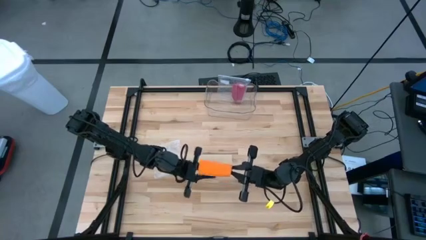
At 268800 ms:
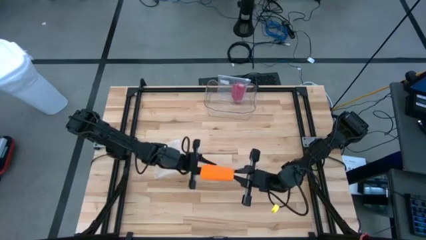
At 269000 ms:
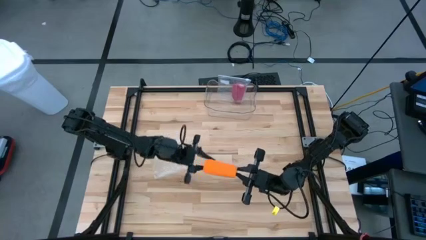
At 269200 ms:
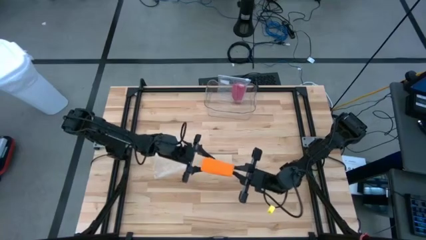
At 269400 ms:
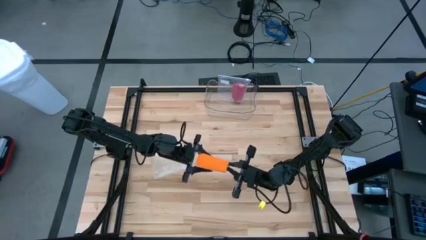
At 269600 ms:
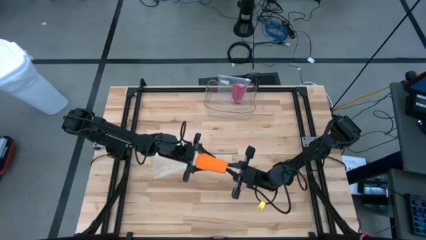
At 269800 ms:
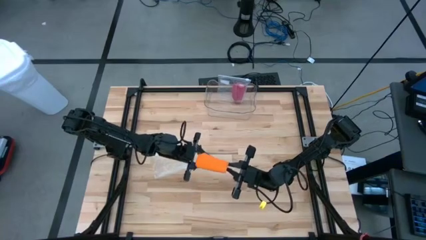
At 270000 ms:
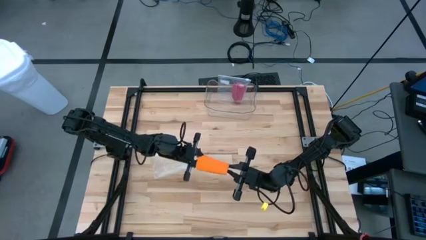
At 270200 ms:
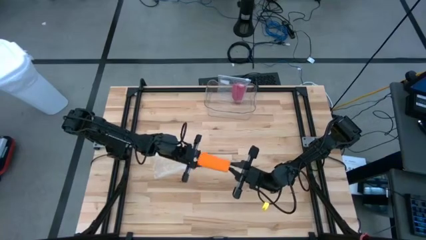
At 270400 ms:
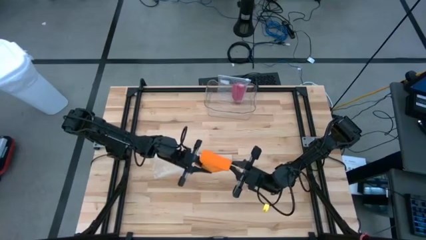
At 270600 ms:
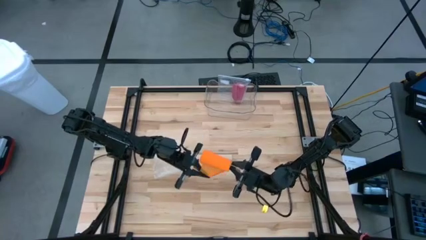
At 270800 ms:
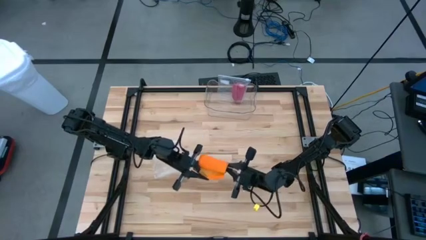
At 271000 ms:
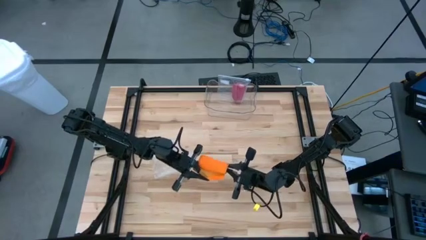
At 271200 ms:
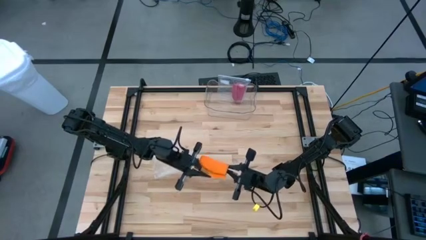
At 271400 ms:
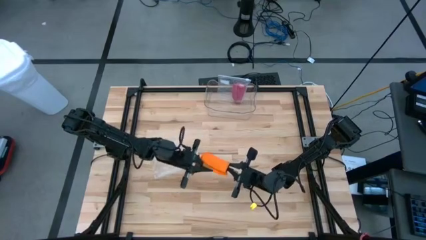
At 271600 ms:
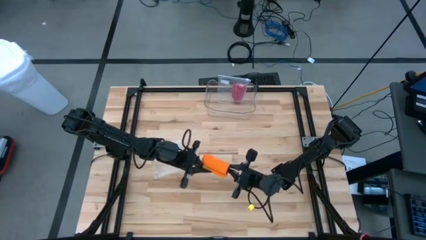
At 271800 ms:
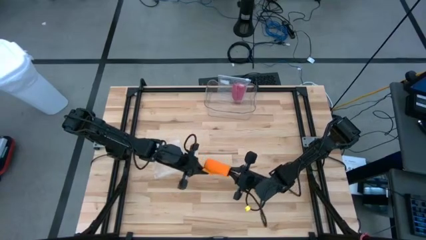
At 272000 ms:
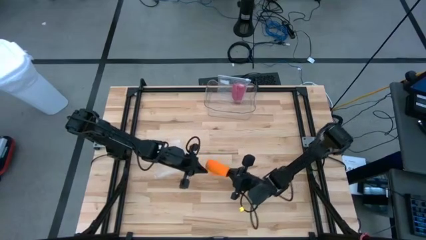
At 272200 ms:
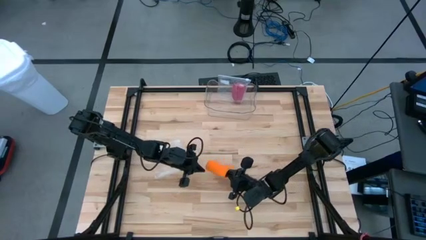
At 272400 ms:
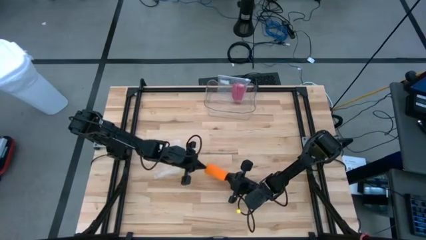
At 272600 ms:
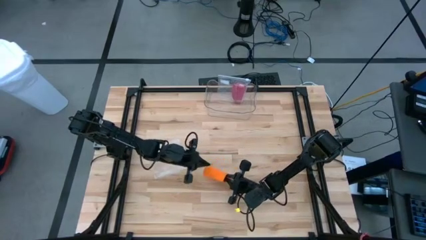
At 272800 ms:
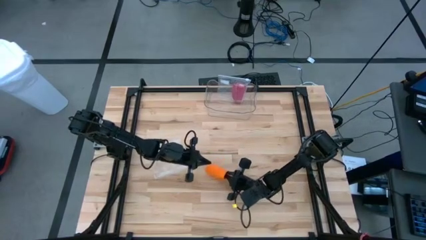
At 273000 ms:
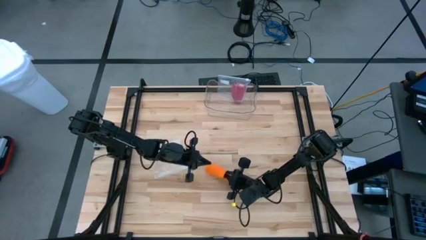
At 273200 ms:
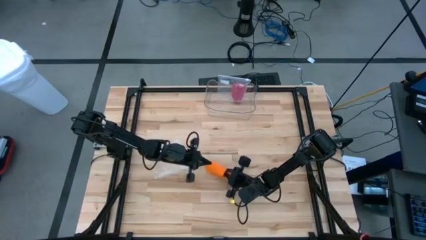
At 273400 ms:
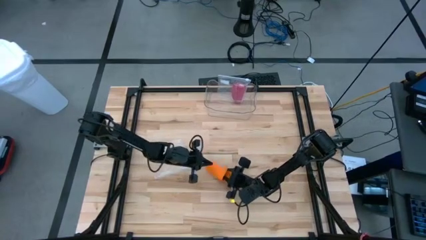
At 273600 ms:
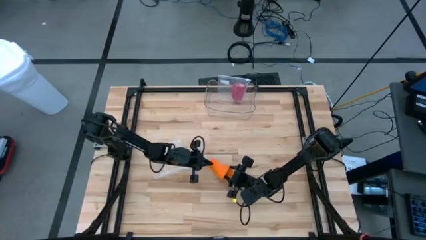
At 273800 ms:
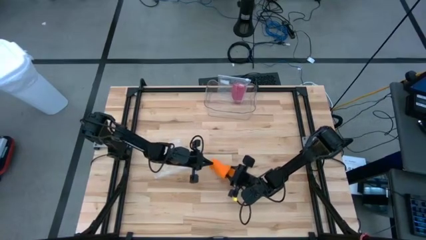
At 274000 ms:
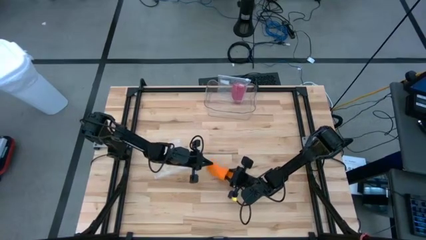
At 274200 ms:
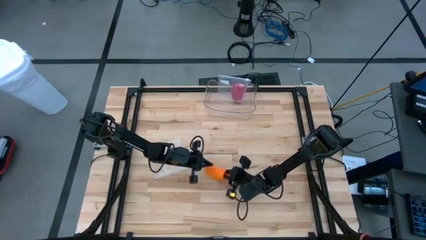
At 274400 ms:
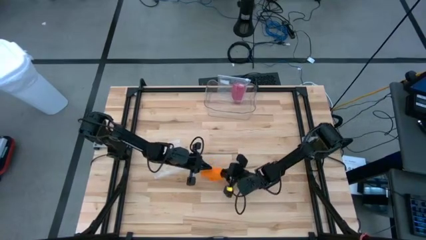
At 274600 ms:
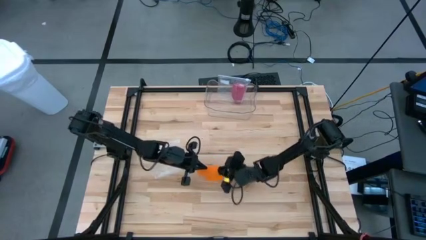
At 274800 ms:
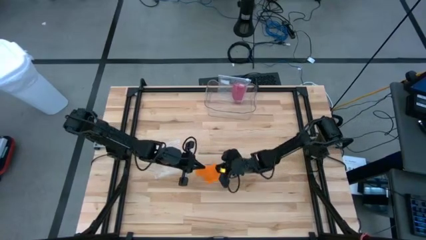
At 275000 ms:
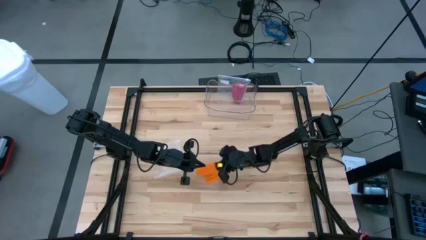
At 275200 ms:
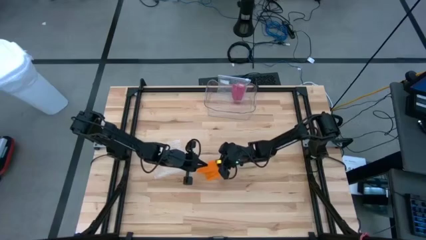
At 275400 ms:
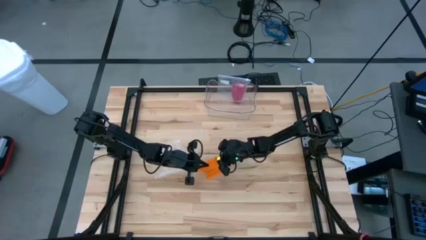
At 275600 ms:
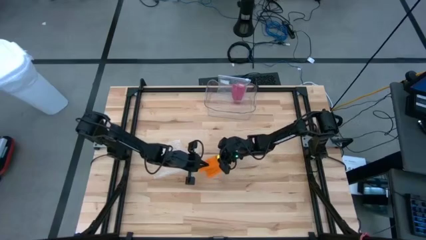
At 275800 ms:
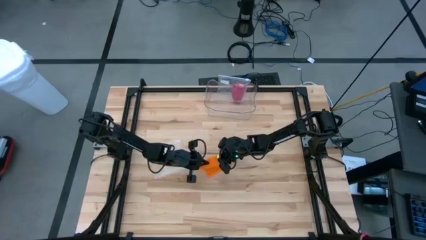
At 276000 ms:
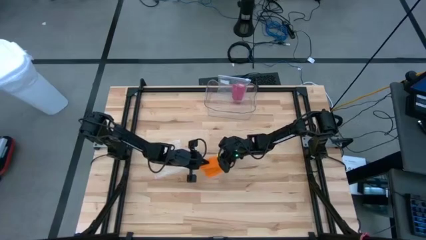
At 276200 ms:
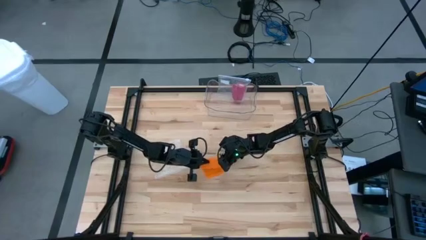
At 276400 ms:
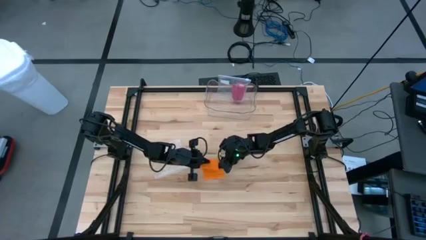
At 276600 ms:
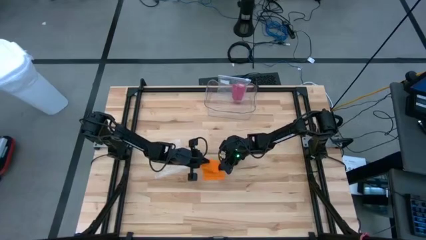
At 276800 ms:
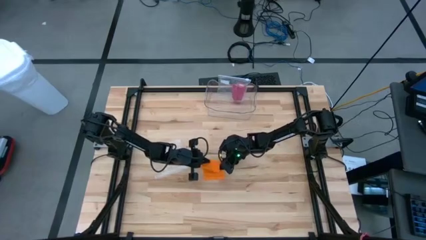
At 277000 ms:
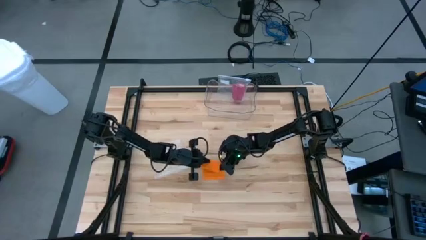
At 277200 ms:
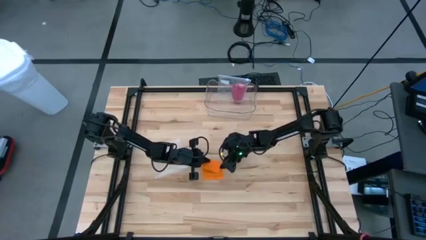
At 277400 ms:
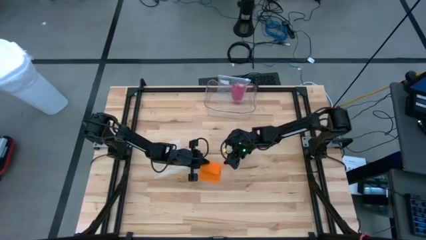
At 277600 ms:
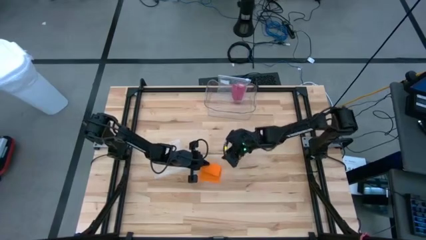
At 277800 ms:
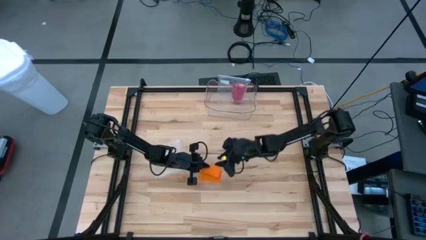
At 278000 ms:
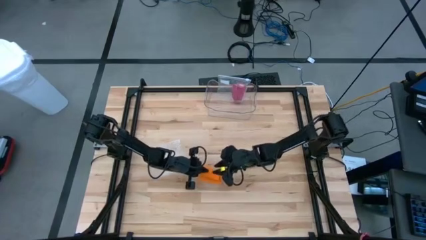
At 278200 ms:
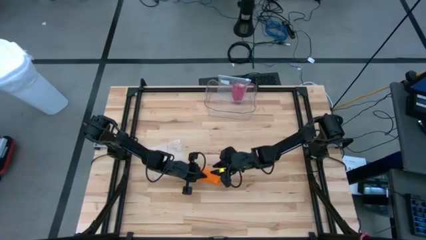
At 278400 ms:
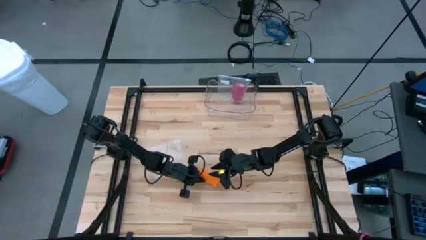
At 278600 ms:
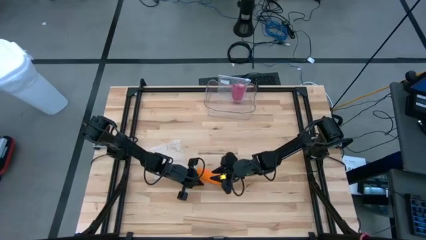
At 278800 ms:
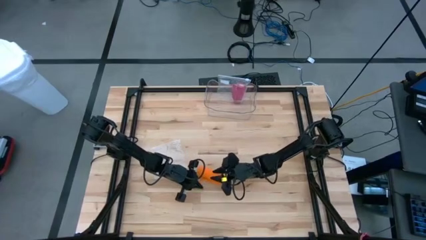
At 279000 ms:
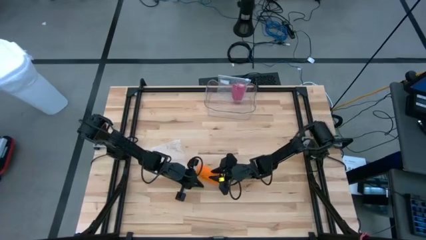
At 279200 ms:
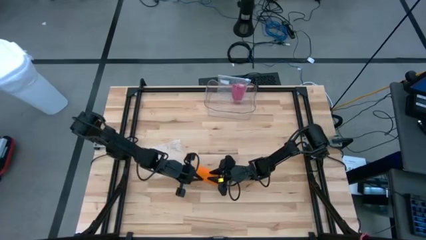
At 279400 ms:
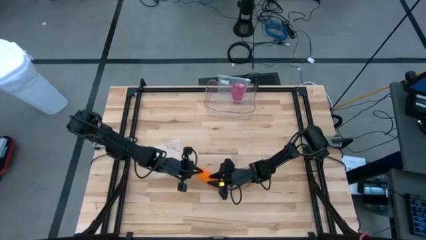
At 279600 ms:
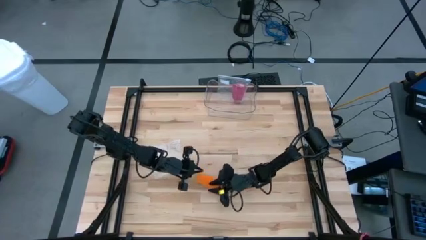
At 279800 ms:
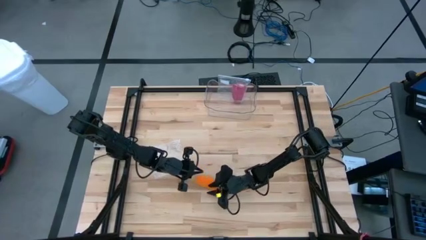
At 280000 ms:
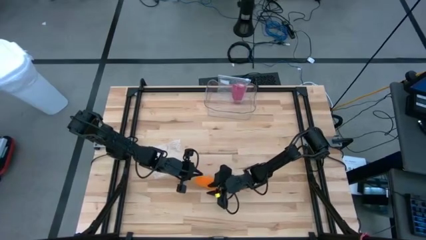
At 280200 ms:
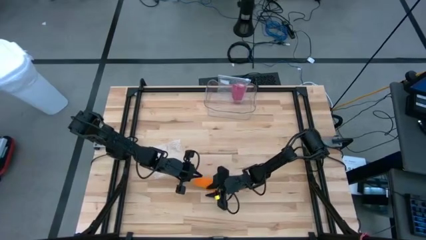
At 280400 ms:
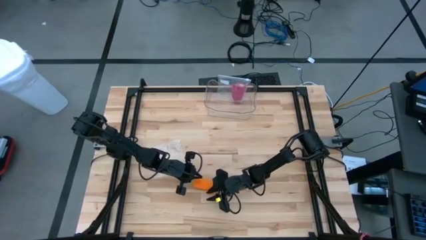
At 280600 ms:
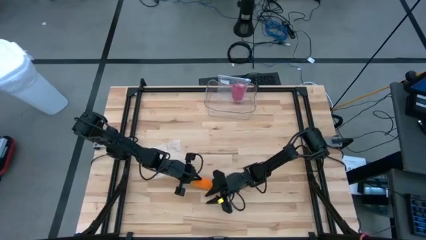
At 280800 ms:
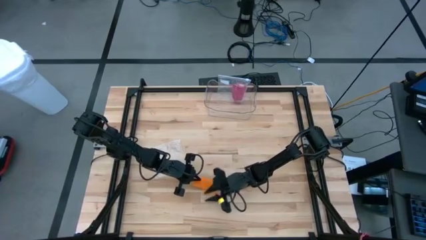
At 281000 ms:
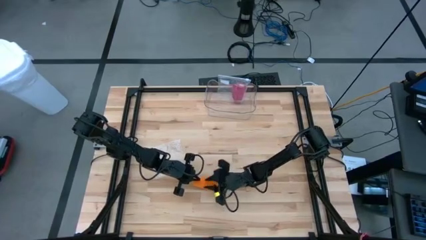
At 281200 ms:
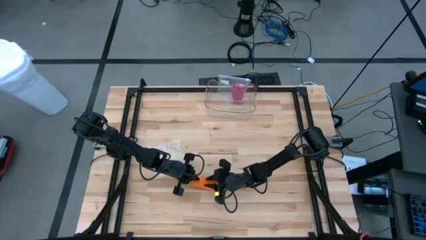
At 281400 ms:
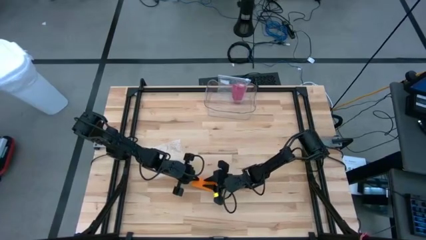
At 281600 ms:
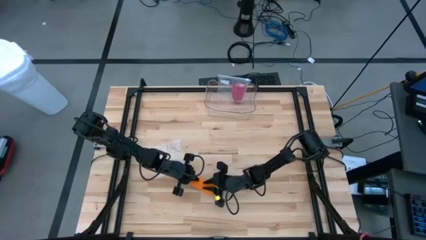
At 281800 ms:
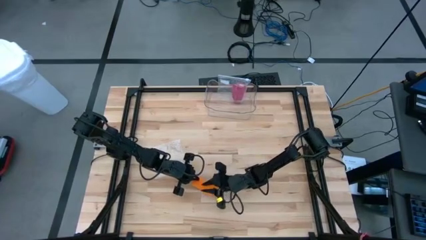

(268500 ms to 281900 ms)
Task: Roll bandage
Roll the orange bandage
